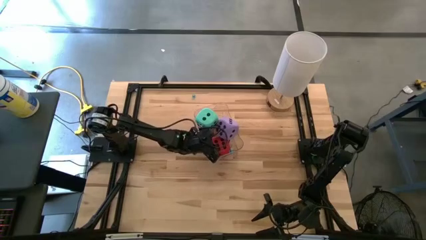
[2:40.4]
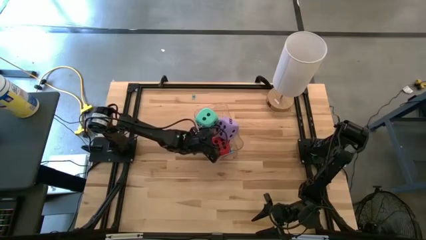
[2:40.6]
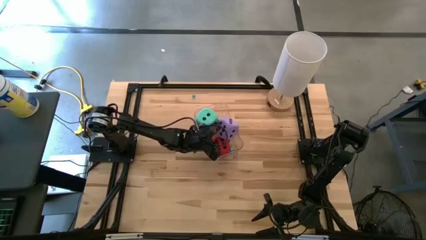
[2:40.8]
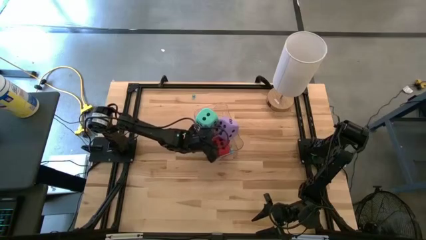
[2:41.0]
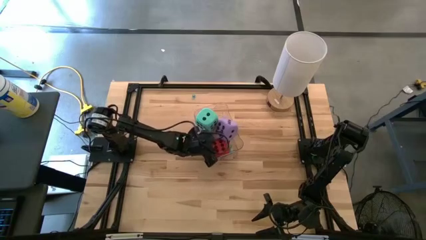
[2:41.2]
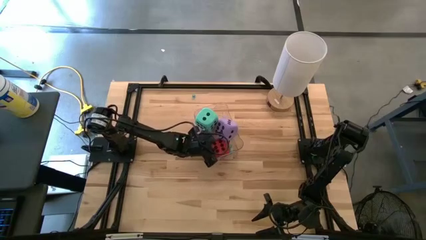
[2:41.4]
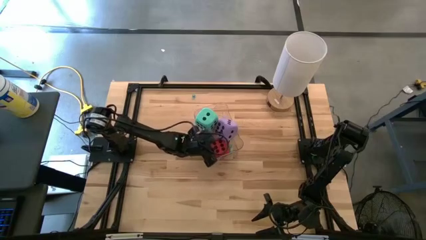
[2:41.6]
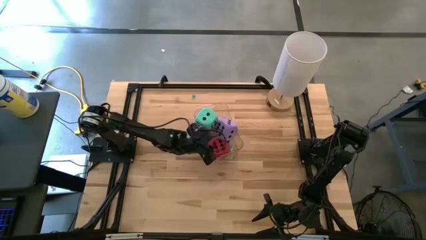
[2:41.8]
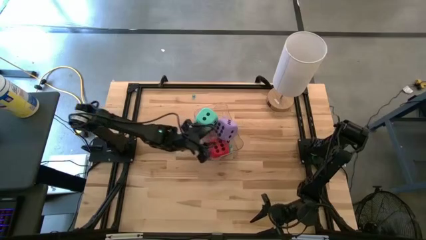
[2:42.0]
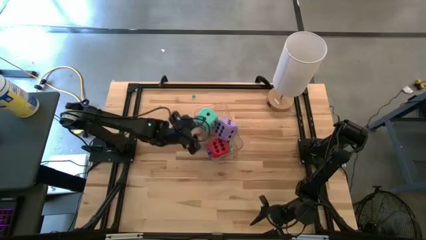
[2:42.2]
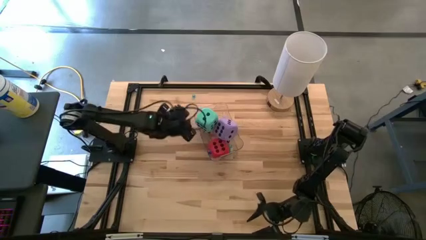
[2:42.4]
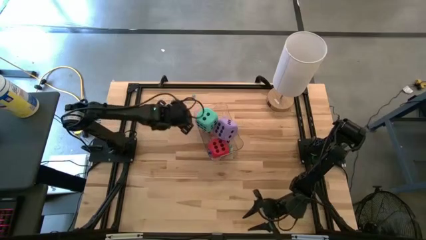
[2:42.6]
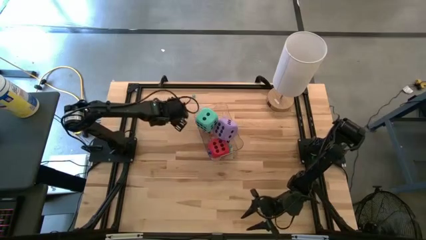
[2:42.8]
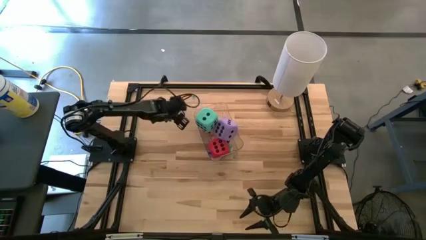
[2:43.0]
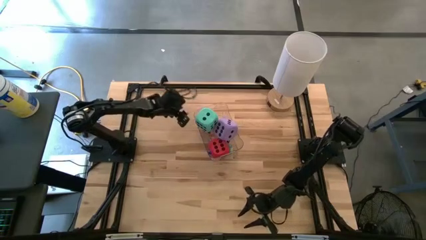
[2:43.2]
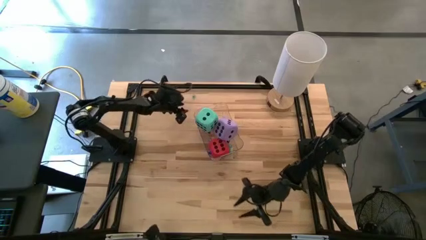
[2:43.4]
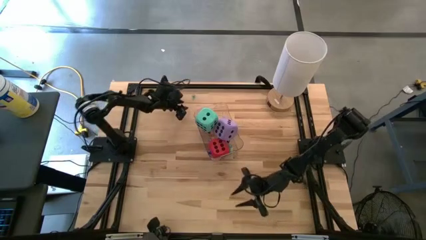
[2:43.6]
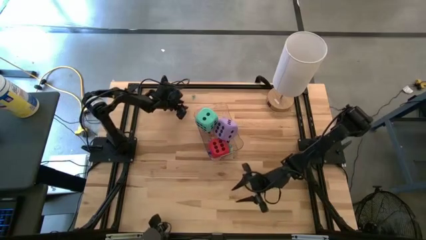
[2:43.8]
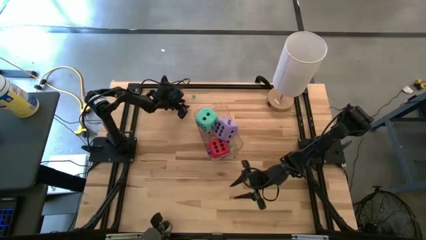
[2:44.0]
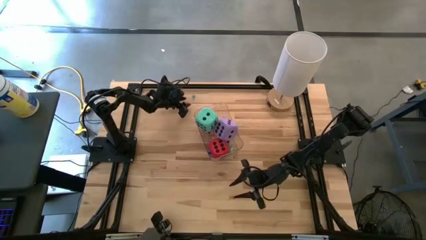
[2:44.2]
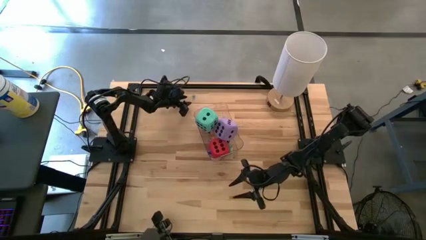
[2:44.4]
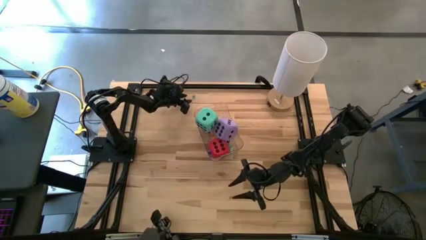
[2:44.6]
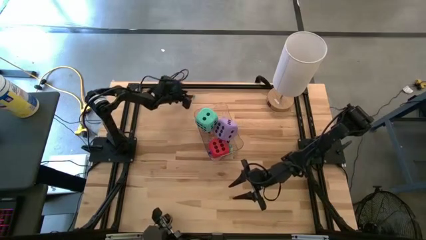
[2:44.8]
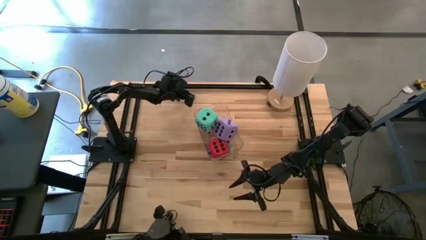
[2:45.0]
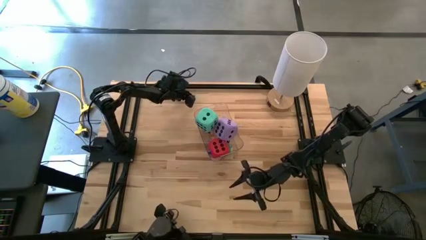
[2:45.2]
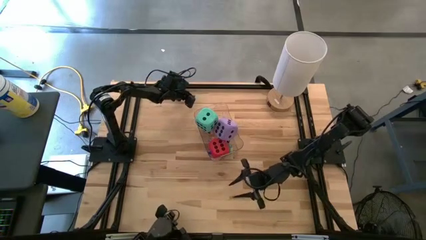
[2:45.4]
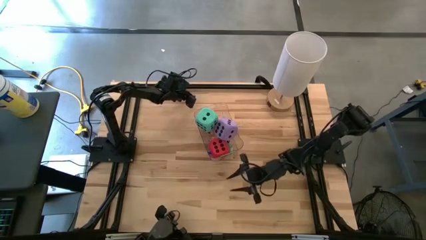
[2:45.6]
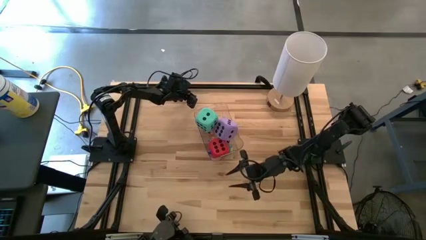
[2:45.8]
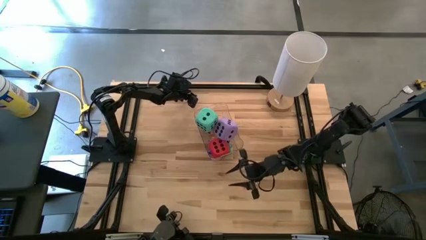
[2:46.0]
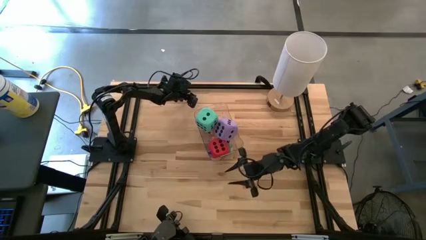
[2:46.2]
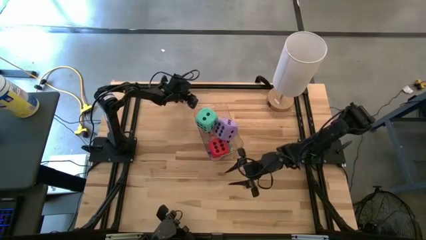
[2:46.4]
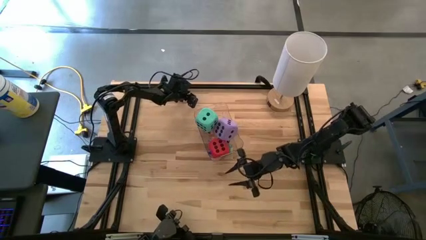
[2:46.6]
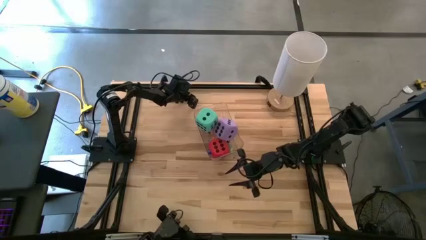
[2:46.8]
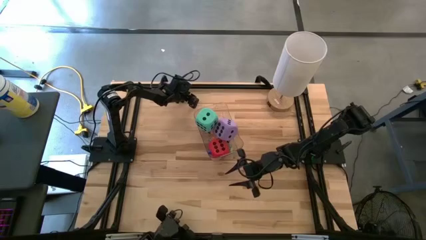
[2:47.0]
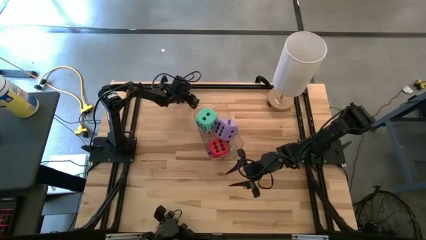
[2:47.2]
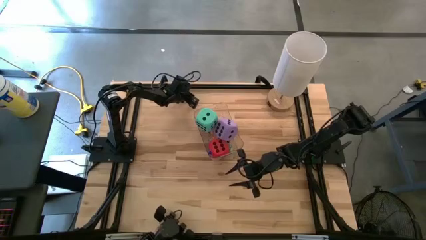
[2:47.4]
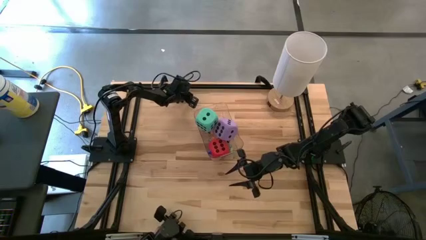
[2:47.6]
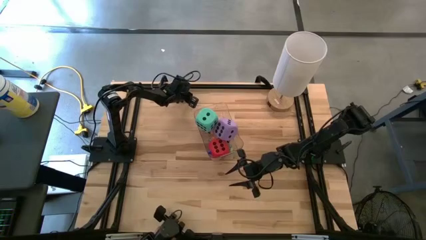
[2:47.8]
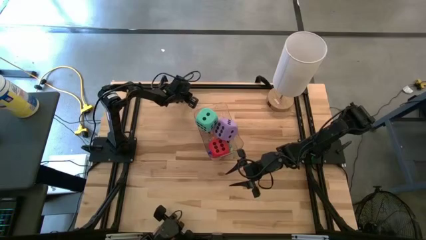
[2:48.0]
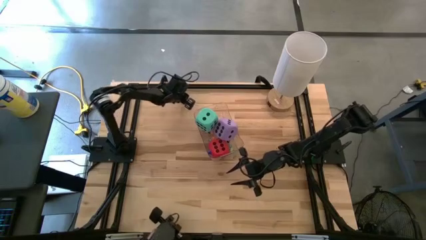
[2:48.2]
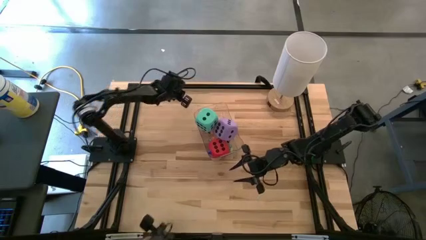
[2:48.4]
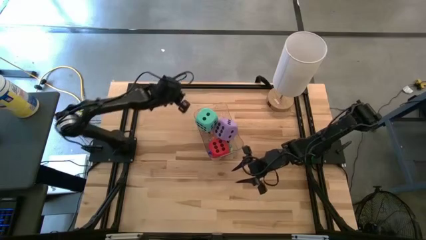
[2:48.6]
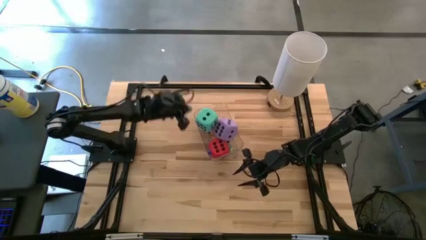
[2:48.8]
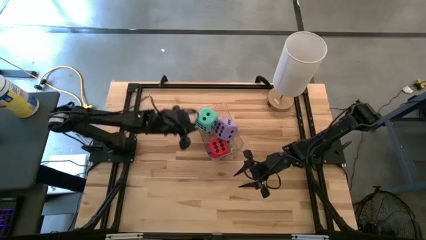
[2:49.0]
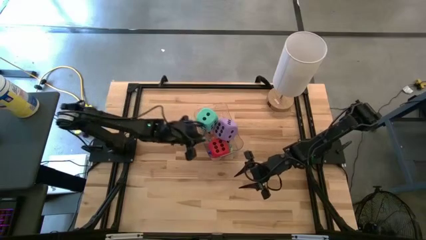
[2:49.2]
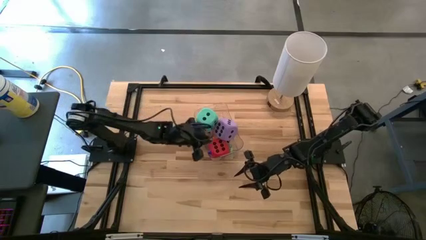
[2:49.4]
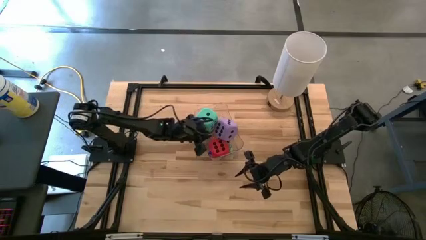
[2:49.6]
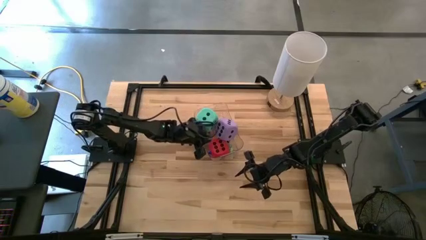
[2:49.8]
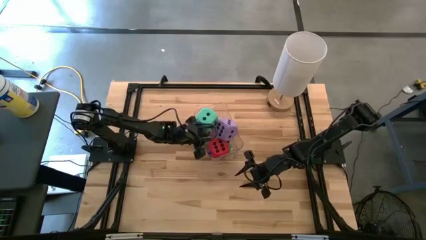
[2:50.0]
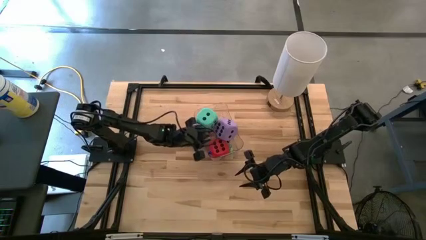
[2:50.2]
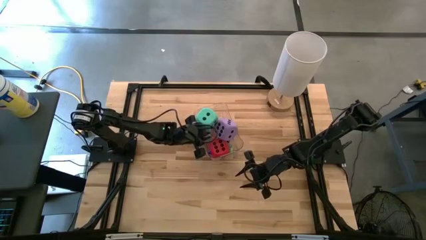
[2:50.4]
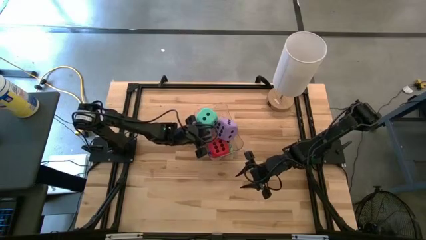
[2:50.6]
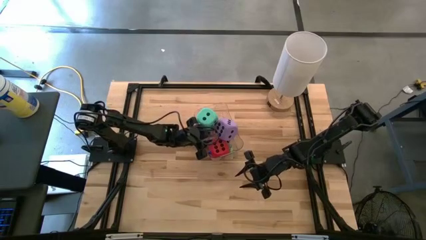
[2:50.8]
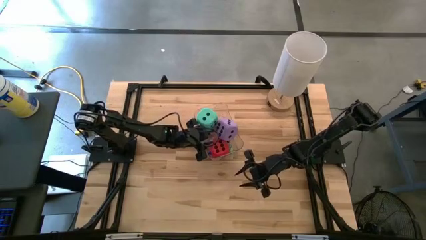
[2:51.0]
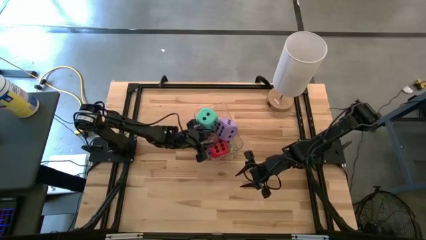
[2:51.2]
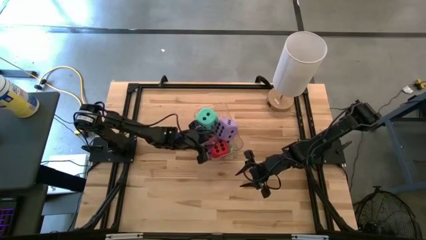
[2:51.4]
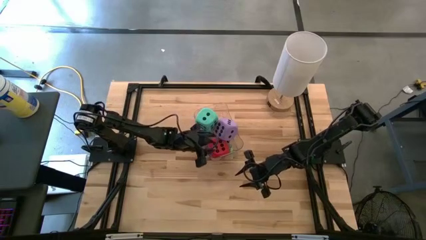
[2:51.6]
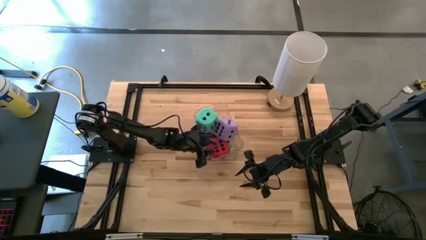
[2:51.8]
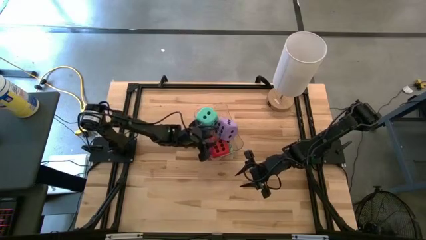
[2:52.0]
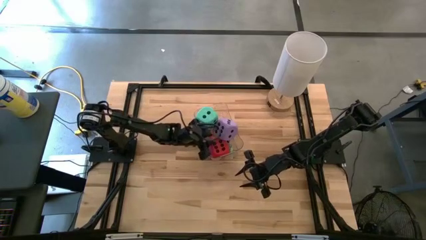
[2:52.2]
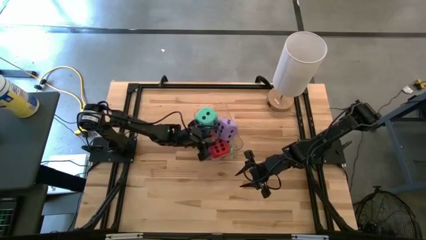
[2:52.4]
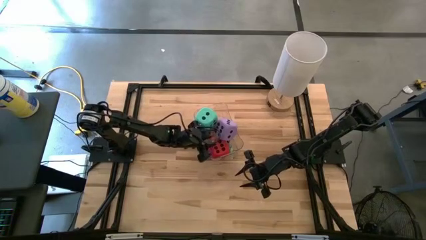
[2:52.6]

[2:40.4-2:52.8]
Task: Pick & Place Dice
Put the small blue dice into the transparent bin

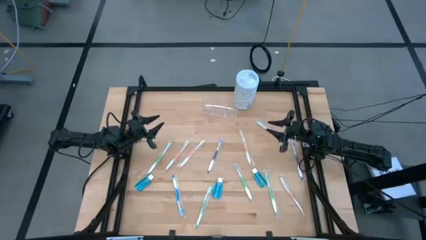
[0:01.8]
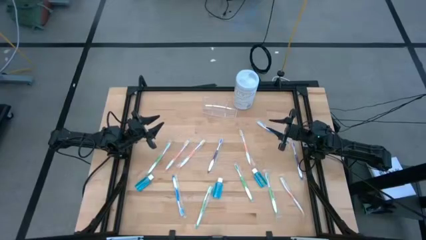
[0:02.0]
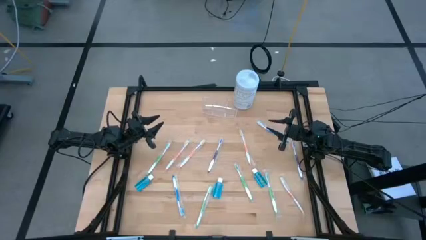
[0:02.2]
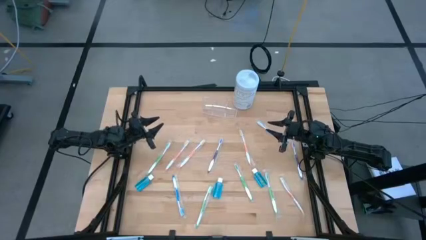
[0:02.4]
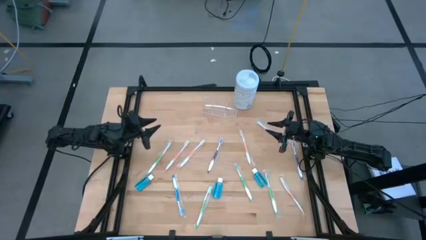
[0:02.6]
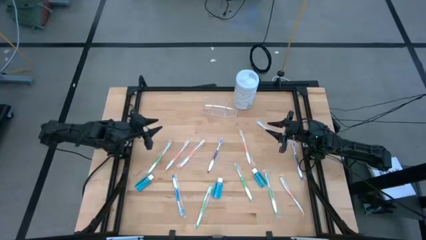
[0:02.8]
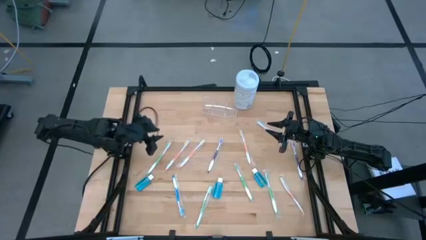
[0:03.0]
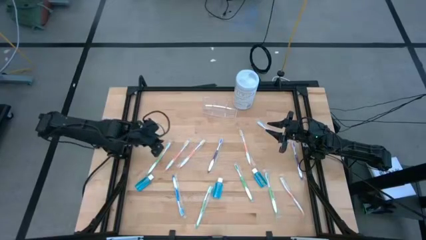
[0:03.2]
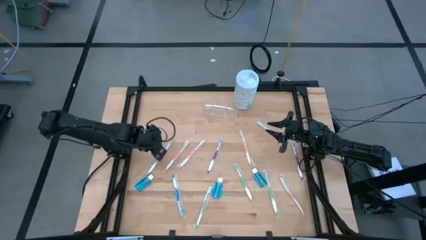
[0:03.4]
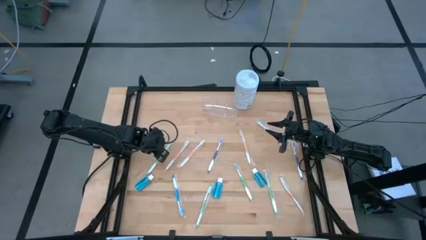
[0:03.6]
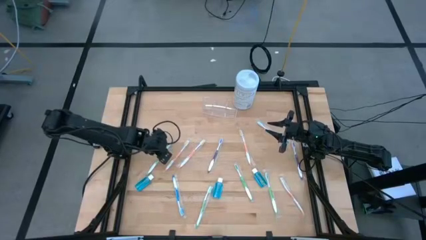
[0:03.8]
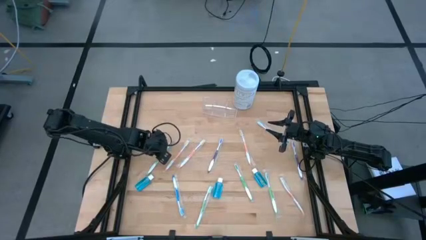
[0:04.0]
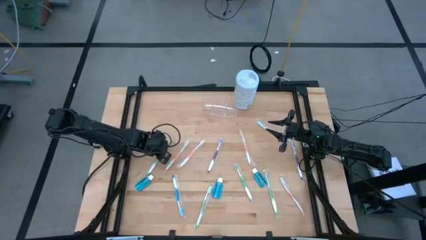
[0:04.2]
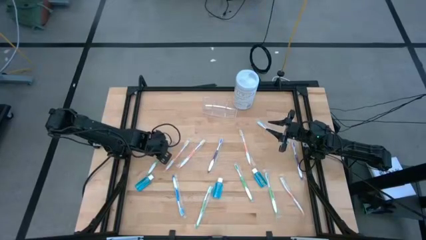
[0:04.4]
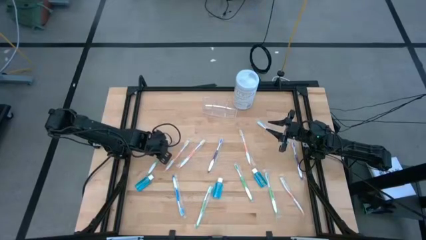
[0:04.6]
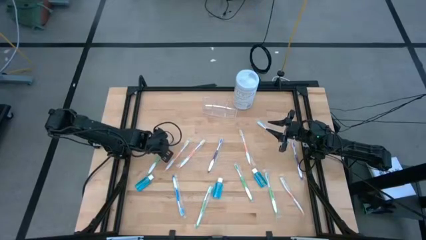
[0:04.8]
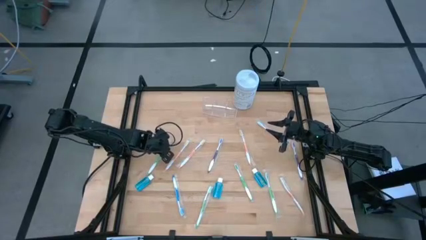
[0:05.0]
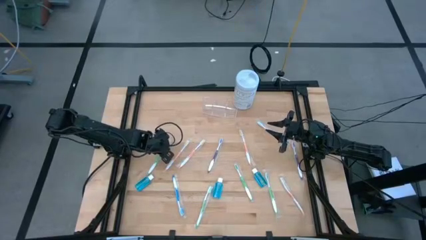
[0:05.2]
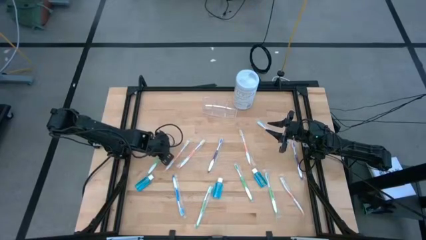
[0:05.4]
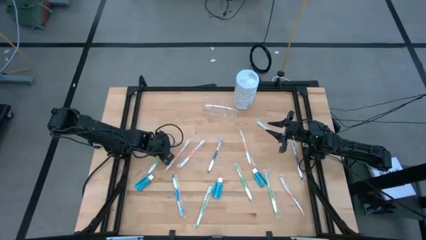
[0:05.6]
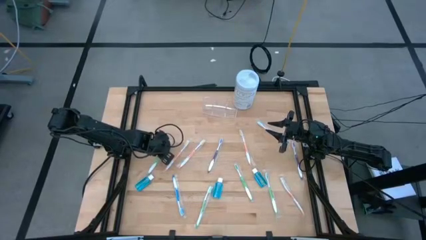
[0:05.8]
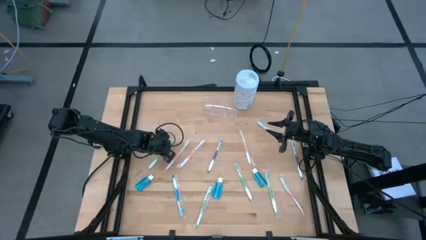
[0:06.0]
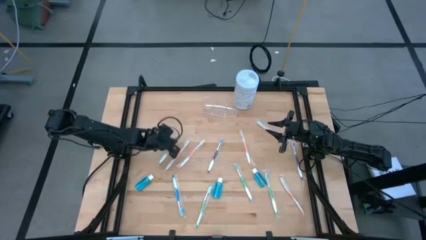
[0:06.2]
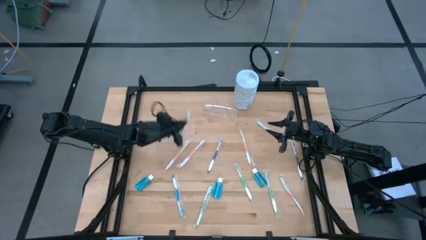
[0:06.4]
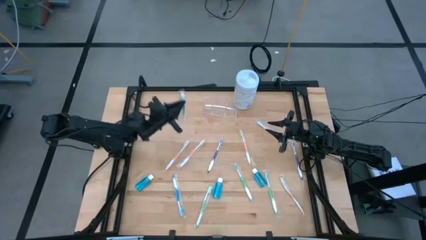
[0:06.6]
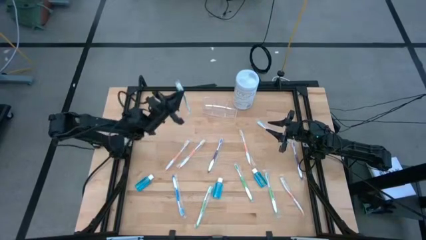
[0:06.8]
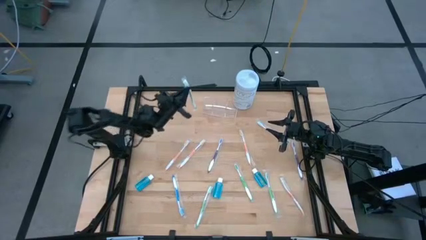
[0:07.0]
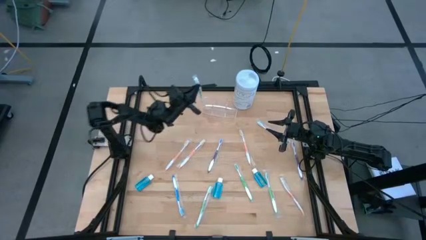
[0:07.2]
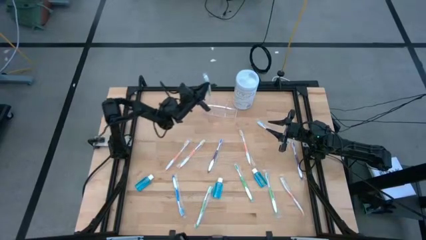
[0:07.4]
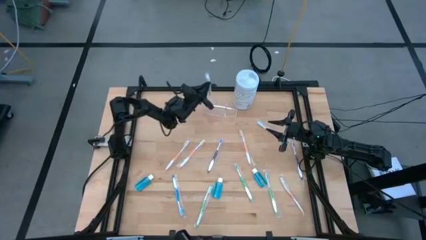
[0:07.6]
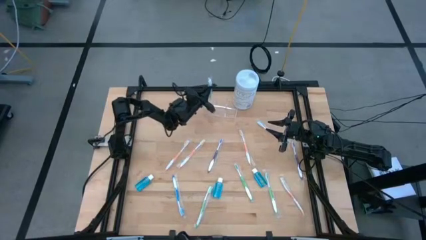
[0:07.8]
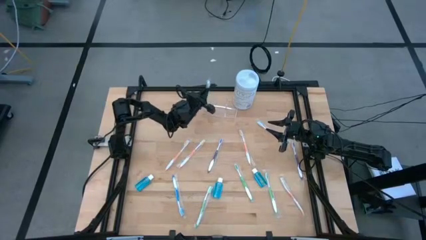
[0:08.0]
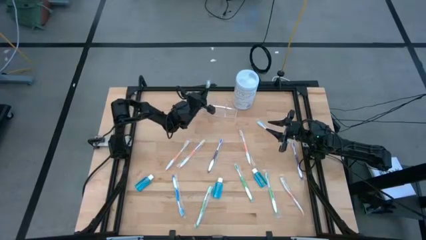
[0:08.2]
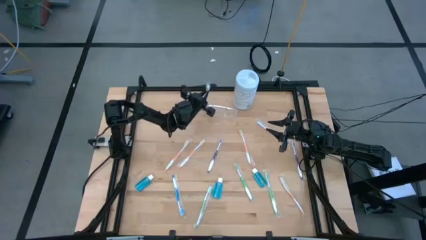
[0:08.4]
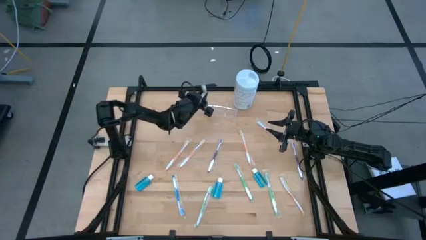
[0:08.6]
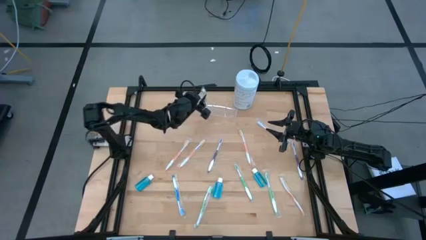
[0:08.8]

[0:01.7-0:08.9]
Task: Pick & Place toothbrushing station
Put the green toothbrush into the transparent organizer
